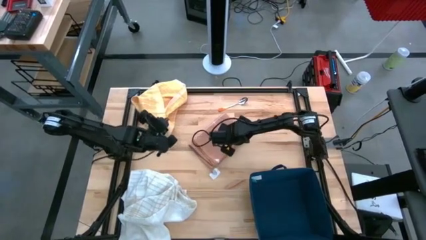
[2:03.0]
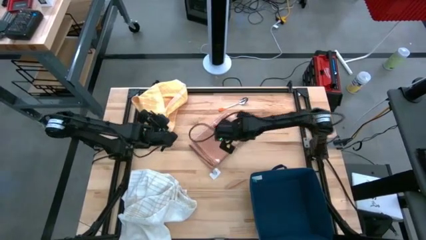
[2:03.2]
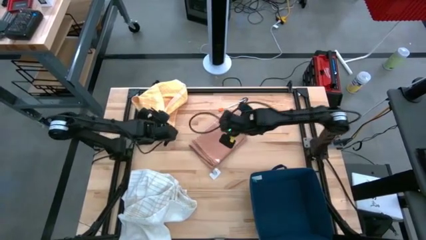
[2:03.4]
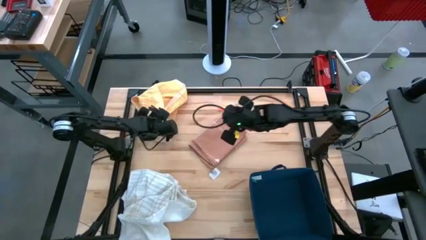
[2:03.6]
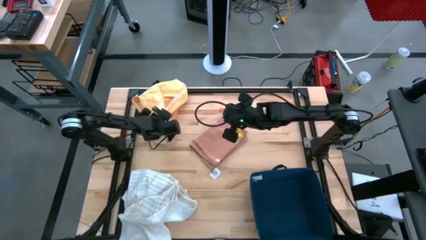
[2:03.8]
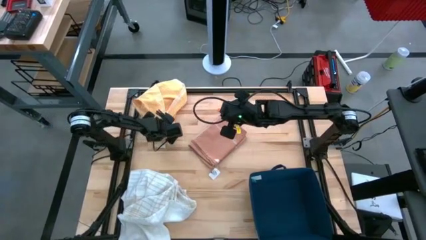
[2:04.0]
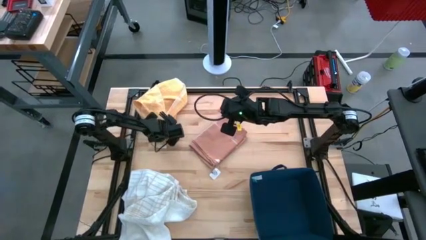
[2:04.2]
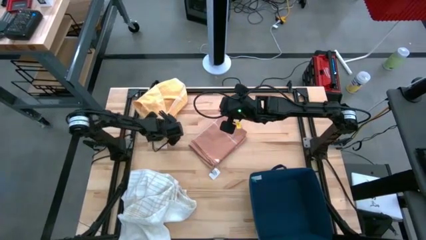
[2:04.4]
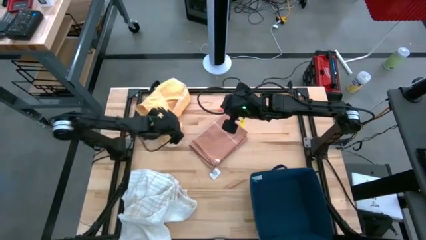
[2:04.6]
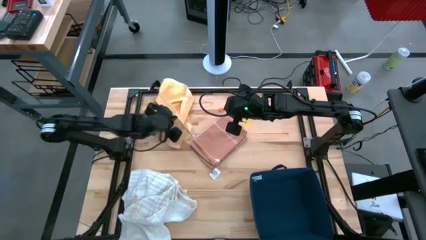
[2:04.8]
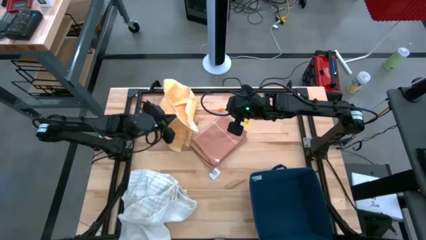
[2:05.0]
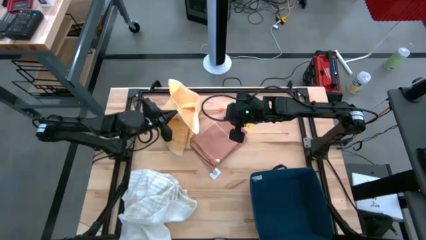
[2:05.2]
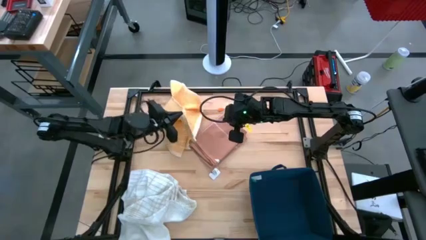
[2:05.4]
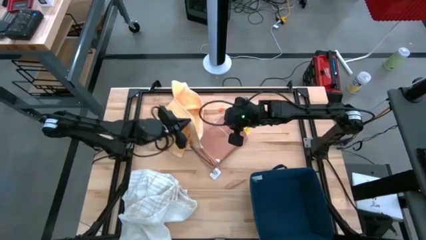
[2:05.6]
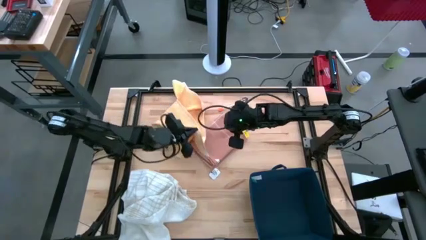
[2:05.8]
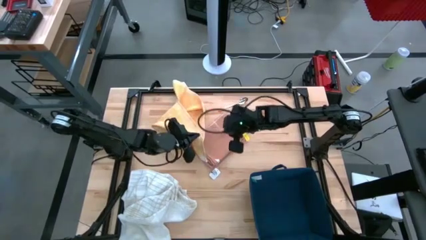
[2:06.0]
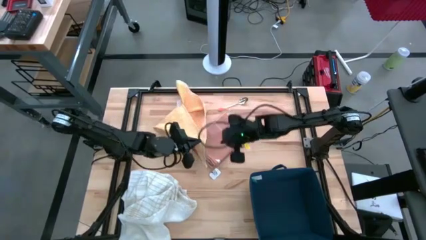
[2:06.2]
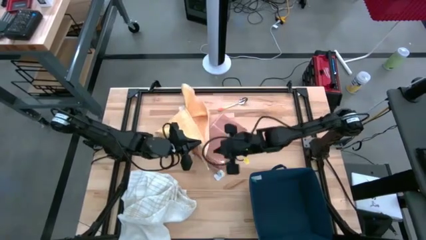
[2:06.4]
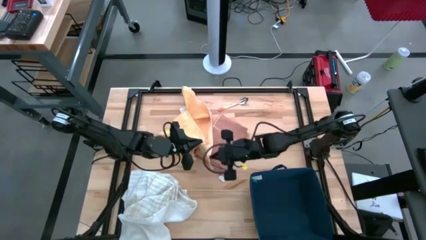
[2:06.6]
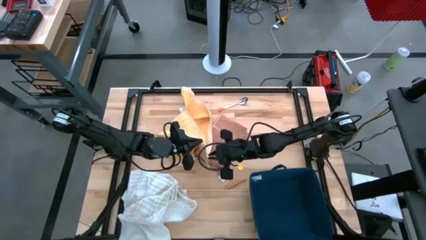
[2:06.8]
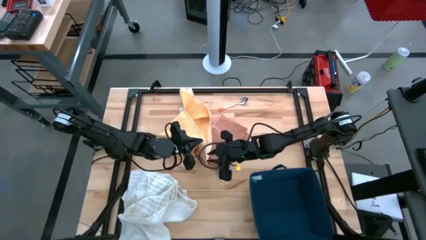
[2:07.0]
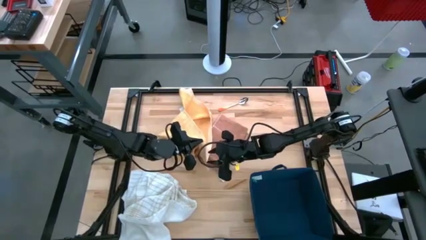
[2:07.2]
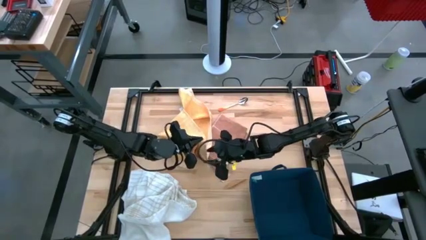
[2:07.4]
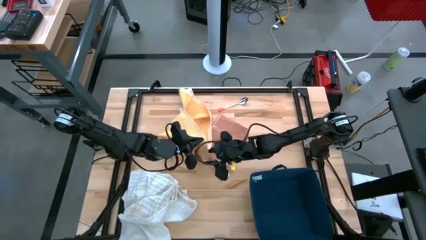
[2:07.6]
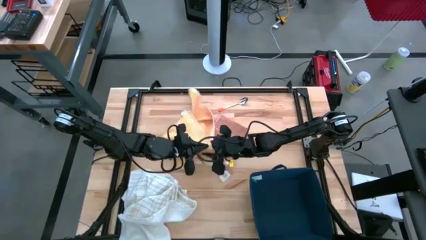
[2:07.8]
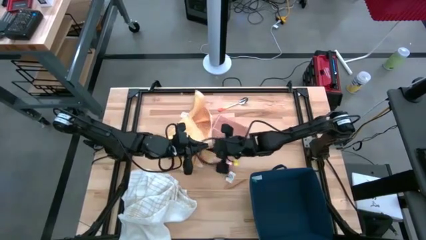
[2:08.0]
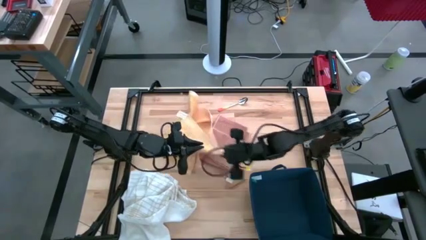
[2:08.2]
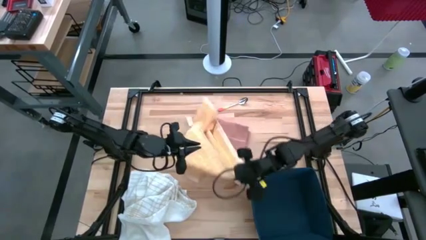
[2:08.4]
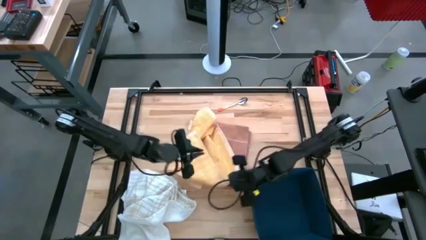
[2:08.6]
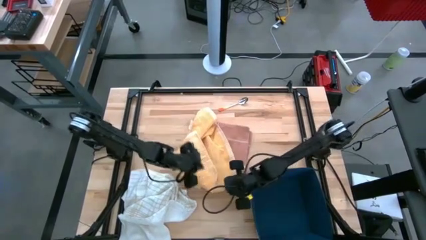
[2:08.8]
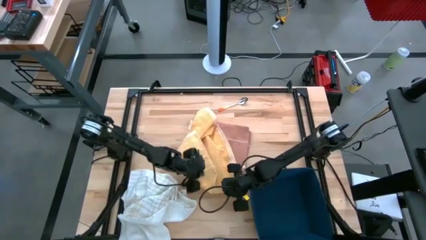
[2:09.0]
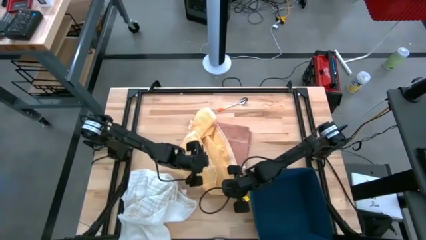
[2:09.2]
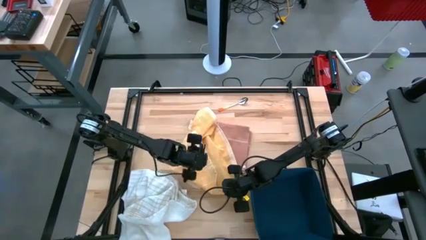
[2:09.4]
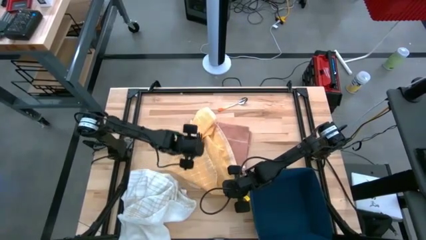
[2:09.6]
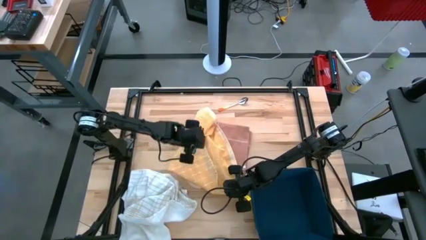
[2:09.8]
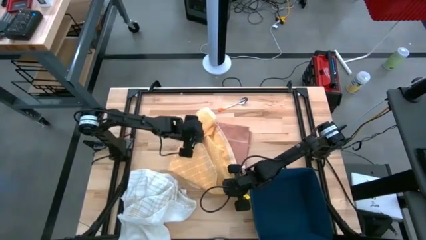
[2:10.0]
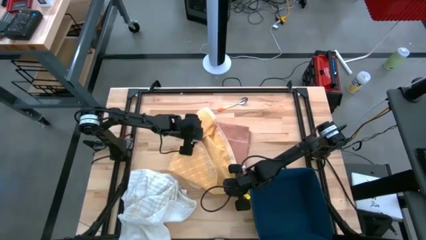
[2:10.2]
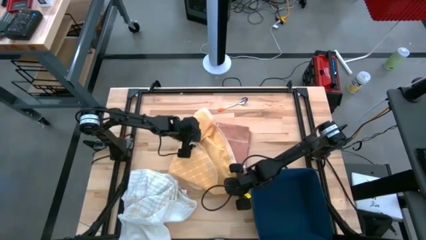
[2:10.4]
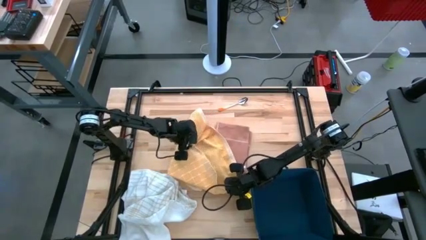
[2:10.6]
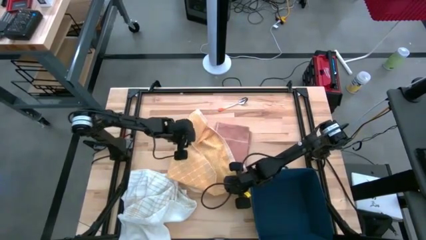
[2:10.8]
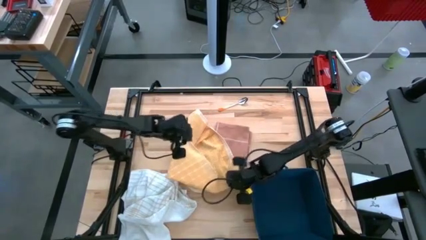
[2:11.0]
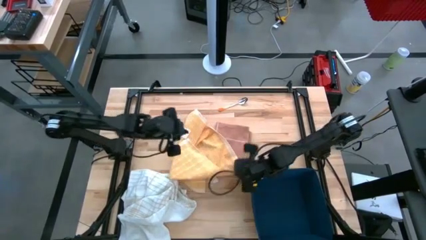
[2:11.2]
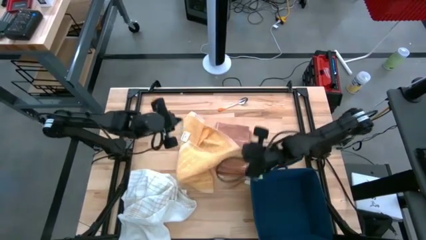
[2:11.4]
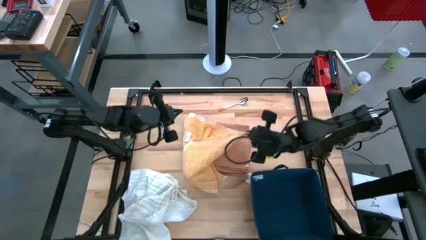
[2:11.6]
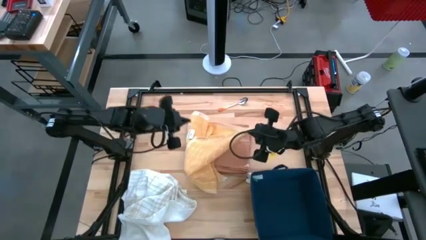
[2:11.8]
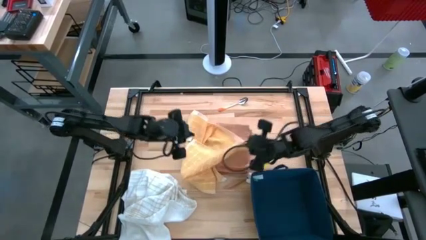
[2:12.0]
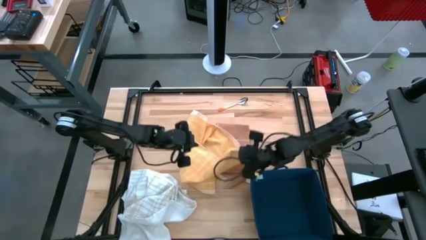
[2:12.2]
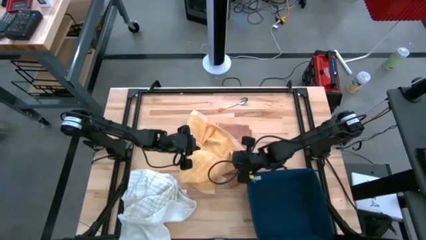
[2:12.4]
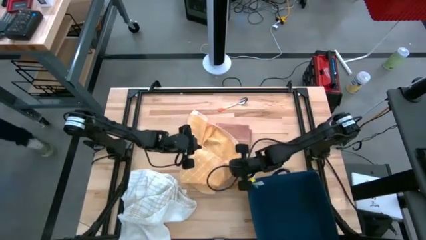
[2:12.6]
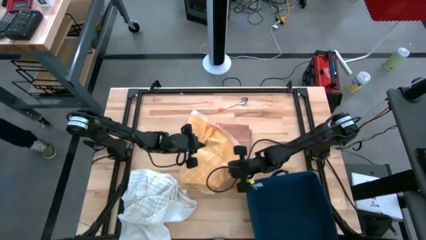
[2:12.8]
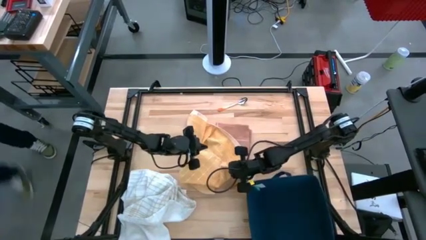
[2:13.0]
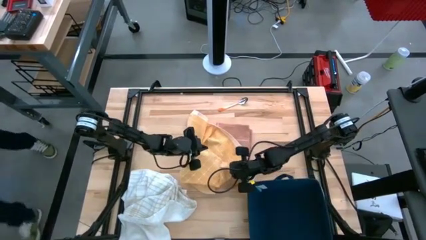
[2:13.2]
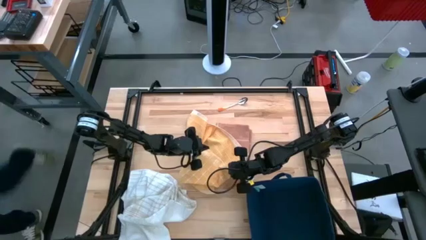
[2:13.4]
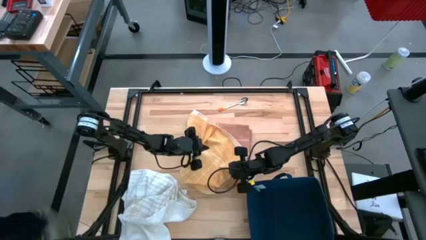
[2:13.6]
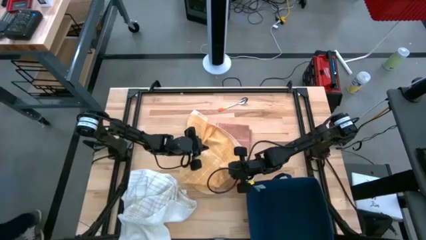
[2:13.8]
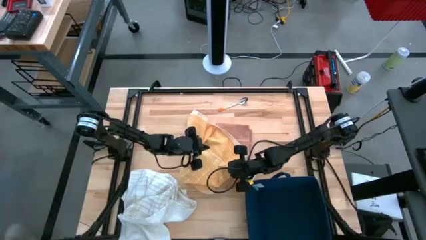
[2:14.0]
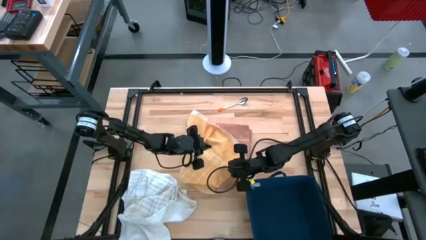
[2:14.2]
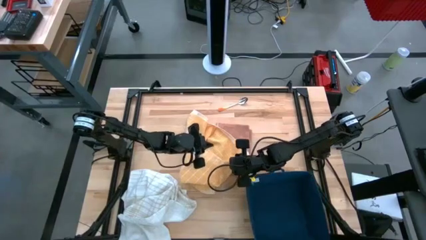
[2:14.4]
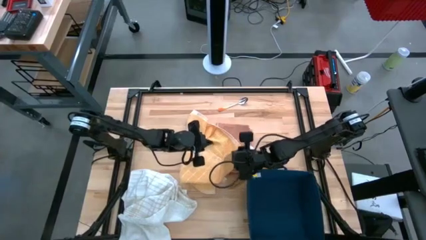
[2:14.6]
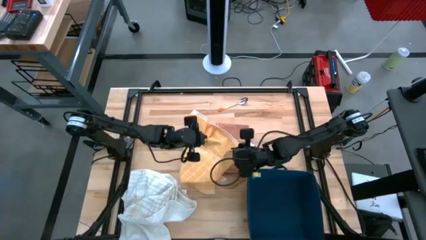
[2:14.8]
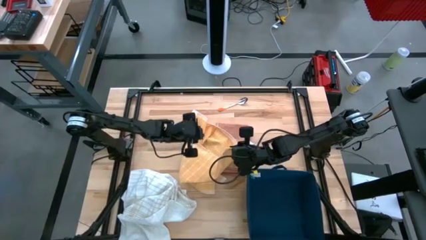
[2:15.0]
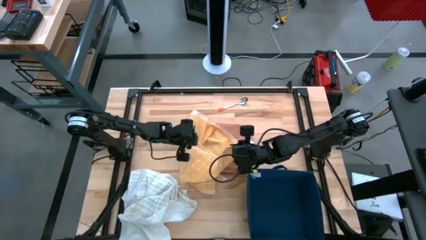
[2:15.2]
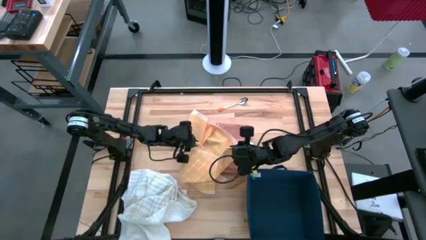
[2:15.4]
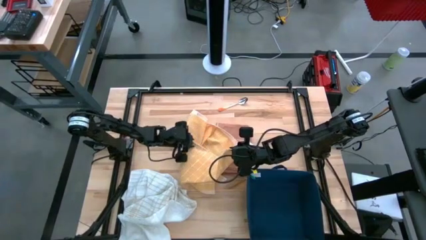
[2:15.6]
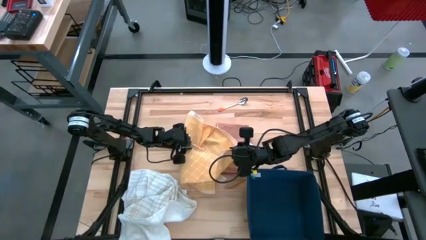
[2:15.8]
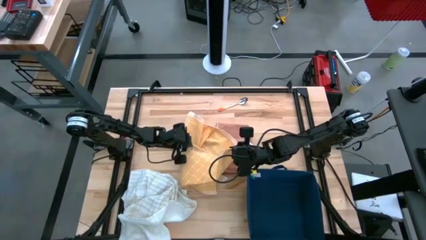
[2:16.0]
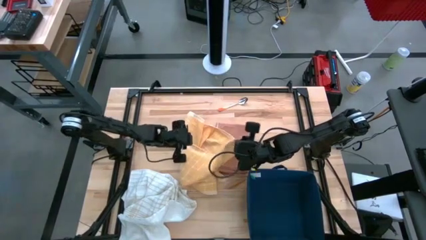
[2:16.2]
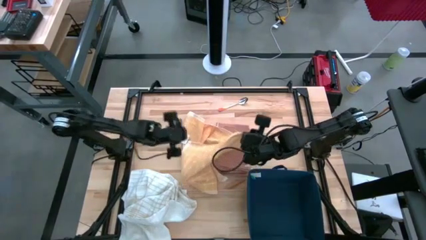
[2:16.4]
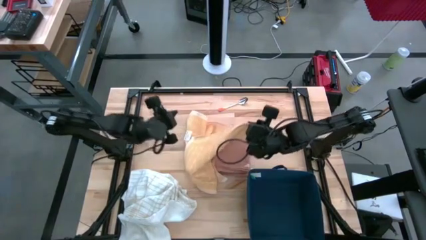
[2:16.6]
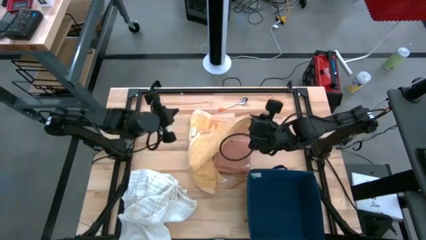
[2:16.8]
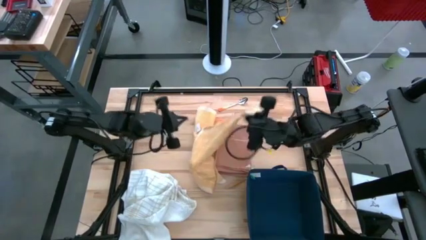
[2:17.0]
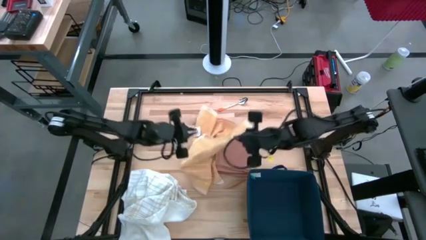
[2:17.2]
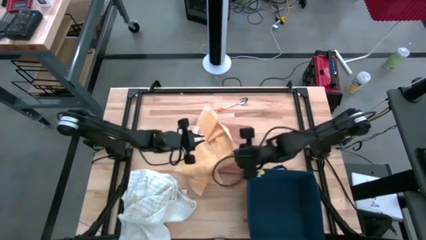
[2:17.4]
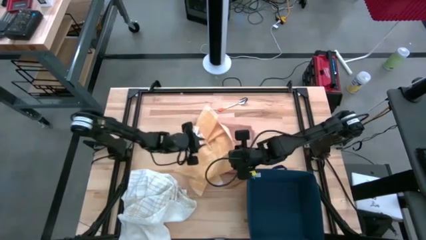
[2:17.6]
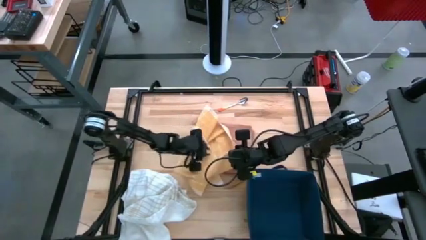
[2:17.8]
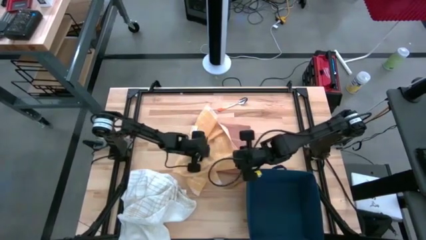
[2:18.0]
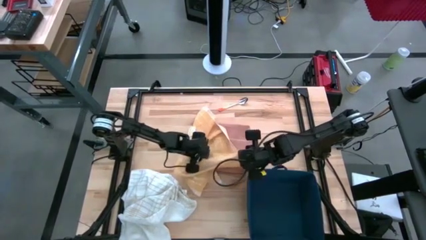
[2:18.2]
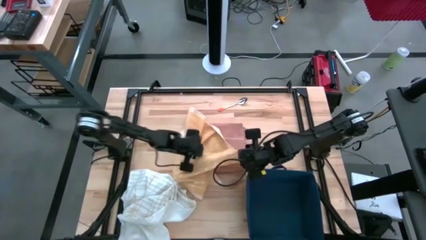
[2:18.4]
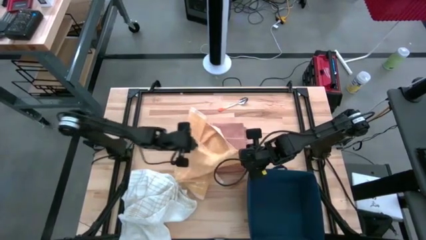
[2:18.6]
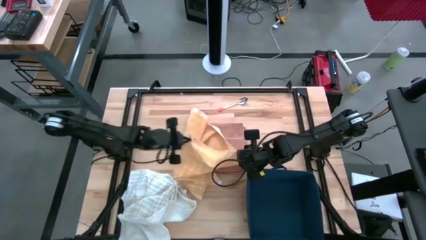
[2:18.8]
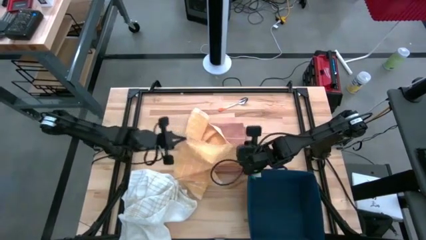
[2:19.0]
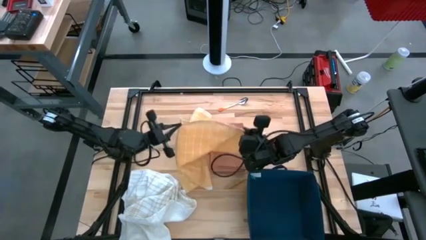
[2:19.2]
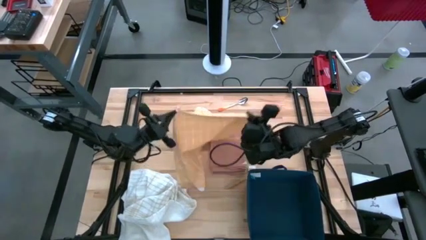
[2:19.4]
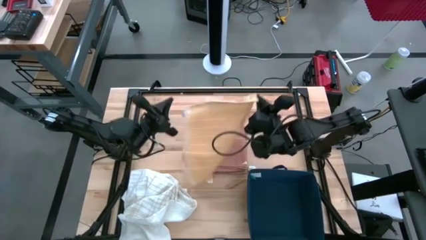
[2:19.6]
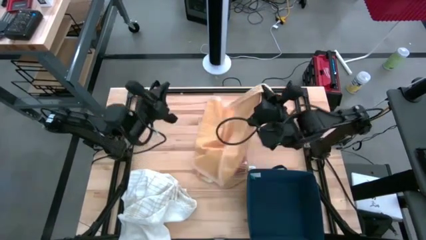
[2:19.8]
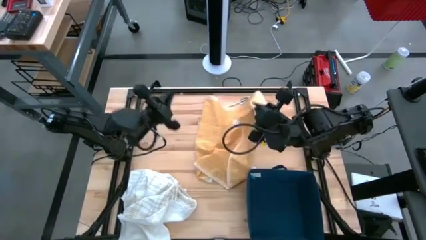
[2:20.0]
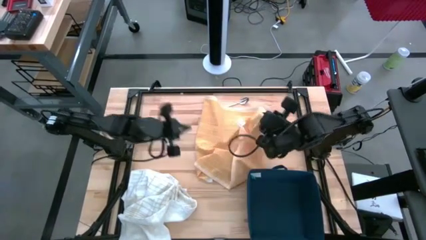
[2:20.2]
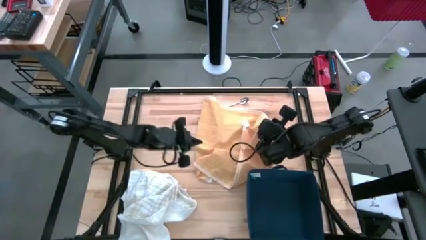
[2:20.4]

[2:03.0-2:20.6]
Task: Fold towel
Fold the yellow towel
